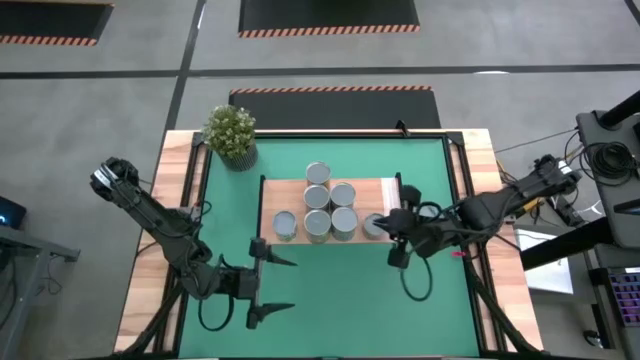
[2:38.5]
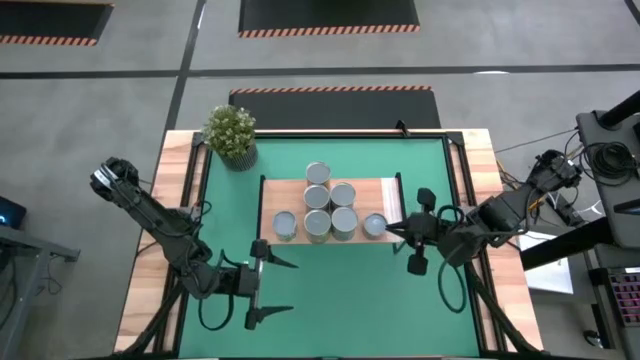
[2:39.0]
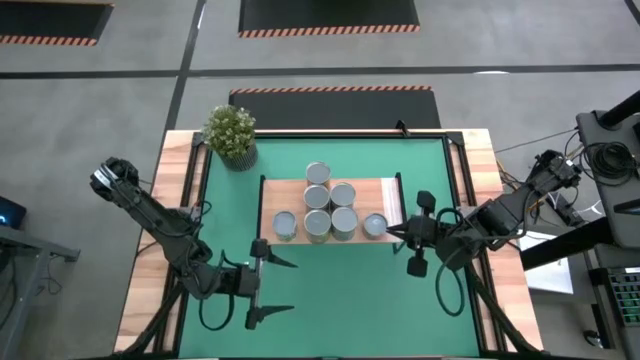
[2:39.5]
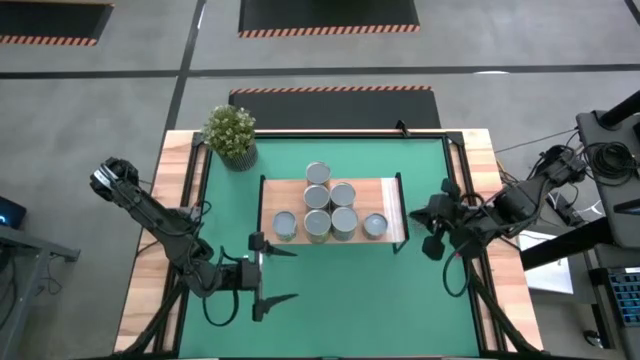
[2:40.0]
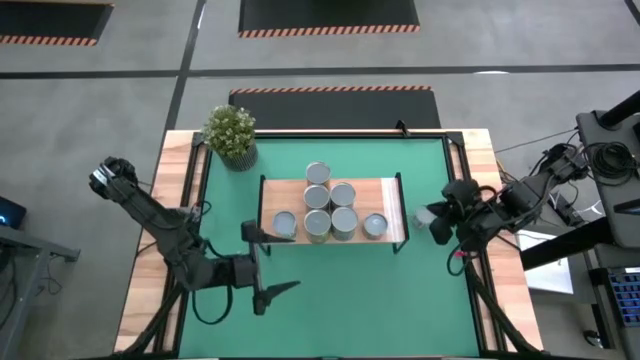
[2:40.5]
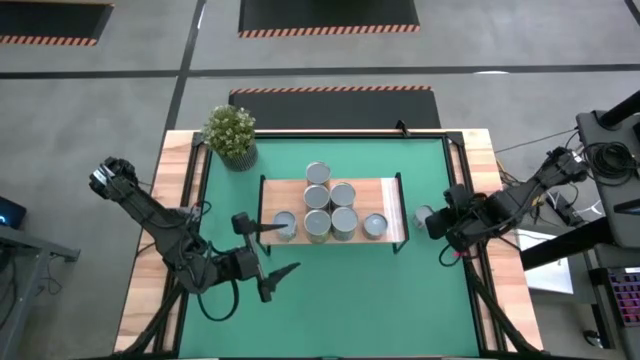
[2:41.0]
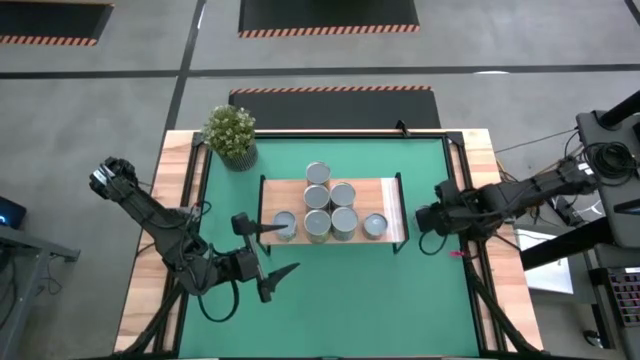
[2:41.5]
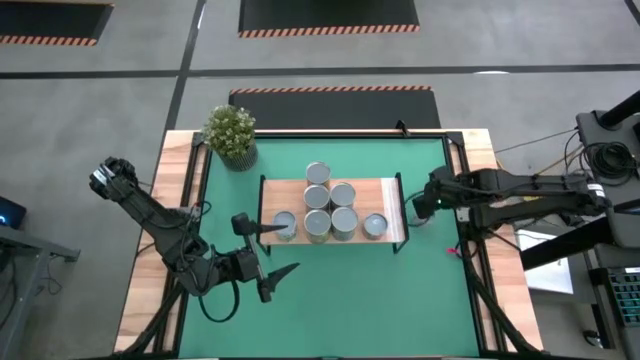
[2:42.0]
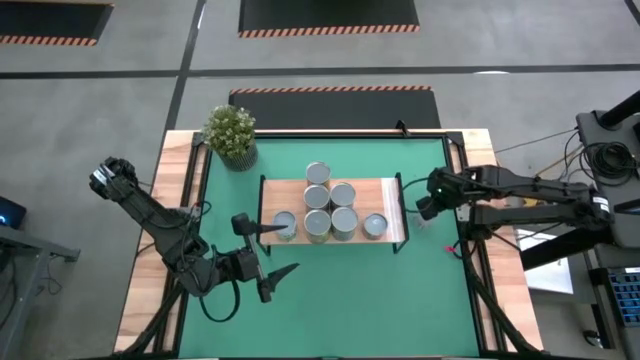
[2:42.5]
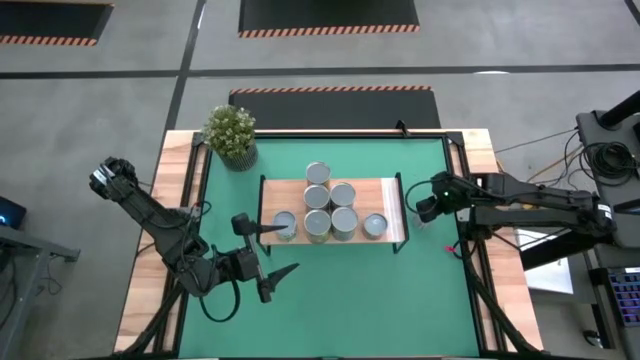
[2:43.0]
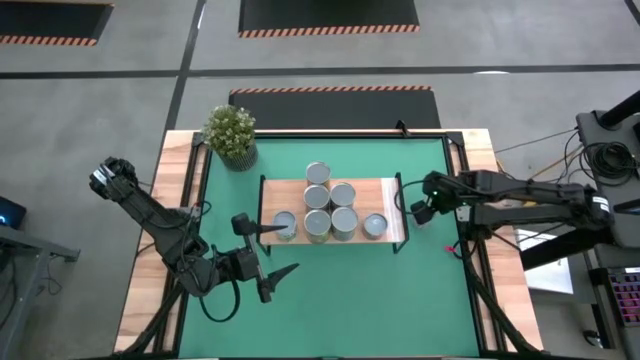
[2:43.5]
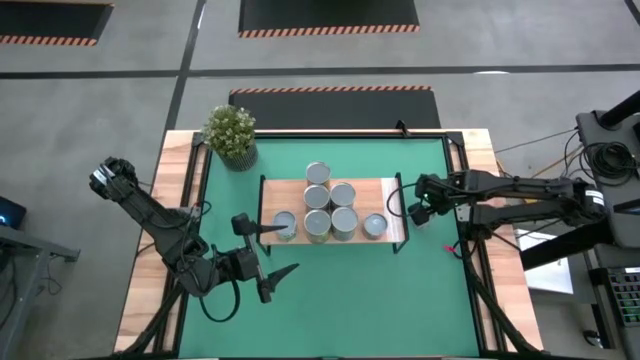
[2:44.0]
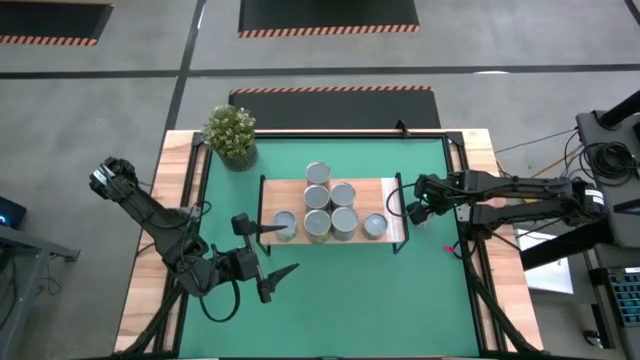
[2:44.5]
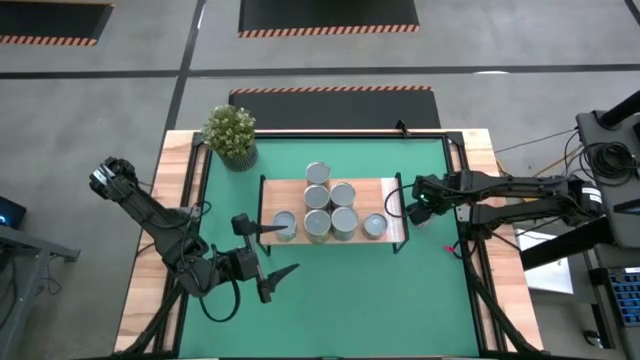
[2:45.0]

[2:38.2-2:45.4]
Task: Pick and place cans onto a shelf
Put the canned of carrots on the shelf

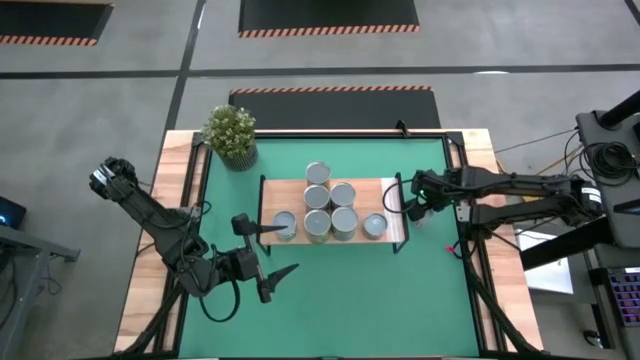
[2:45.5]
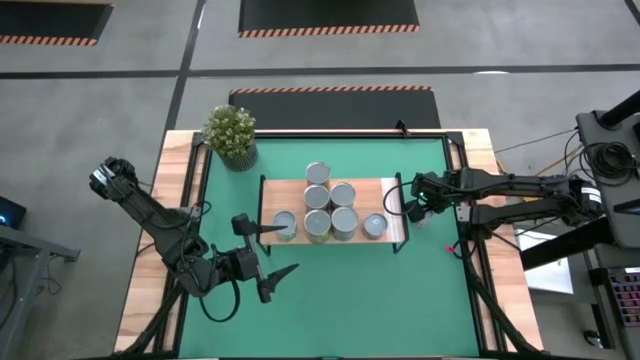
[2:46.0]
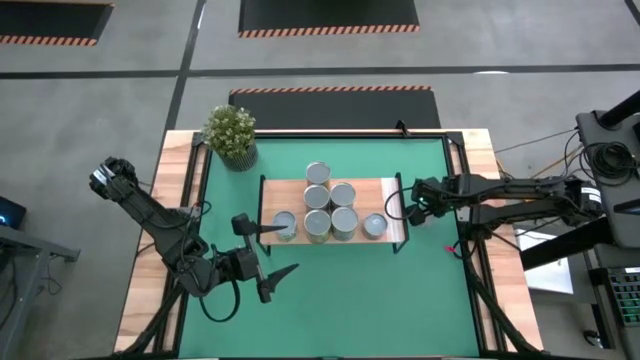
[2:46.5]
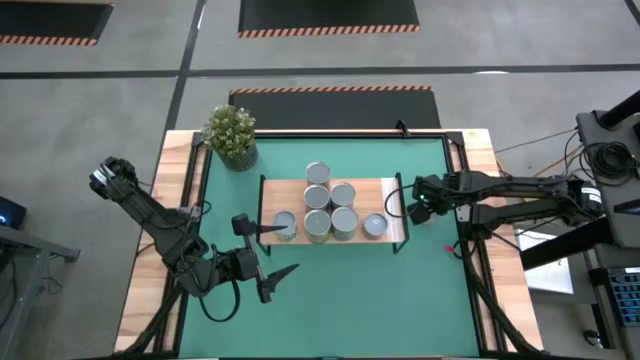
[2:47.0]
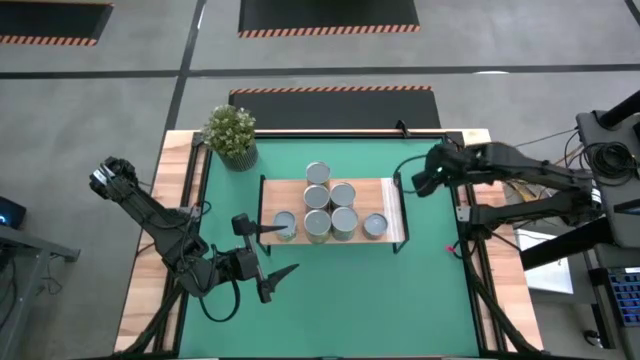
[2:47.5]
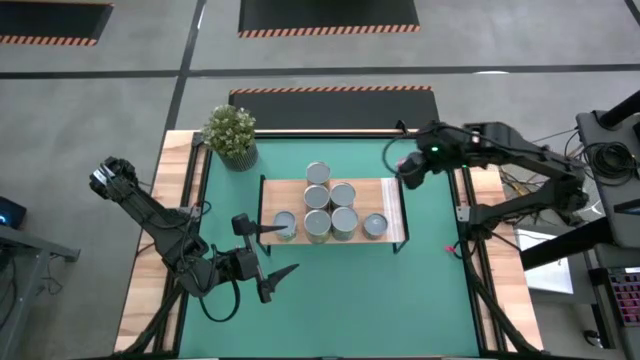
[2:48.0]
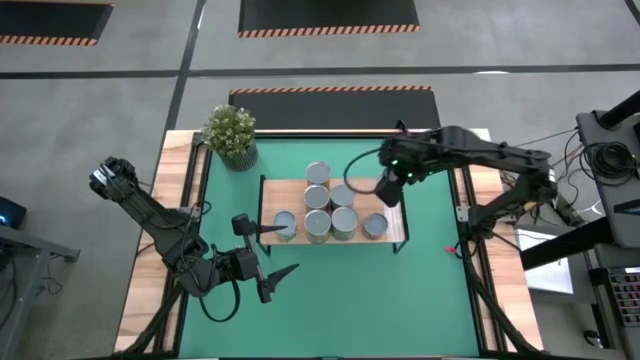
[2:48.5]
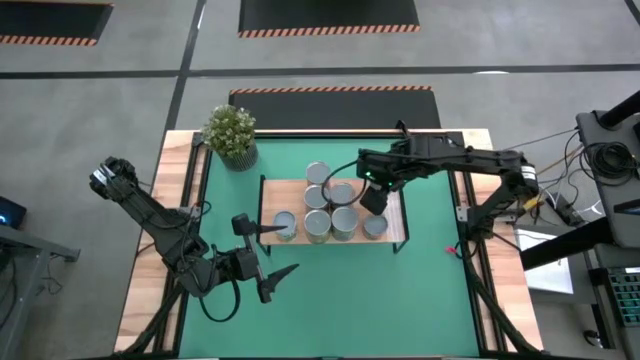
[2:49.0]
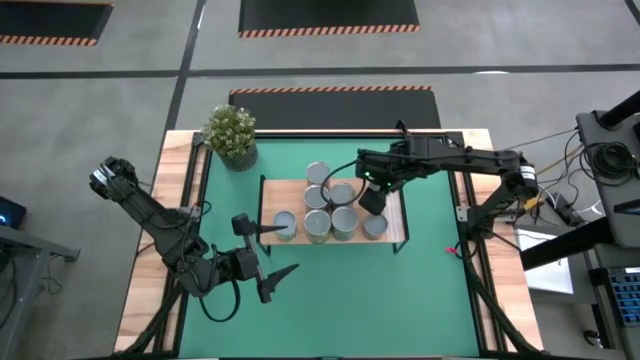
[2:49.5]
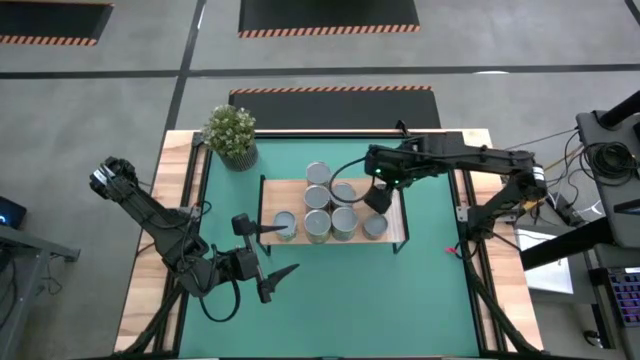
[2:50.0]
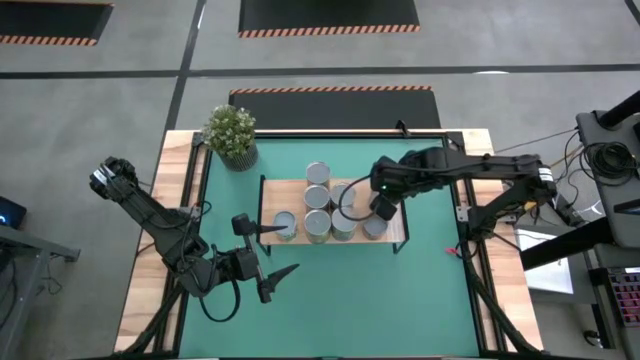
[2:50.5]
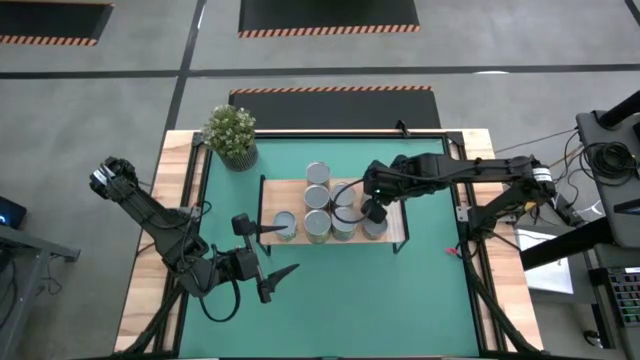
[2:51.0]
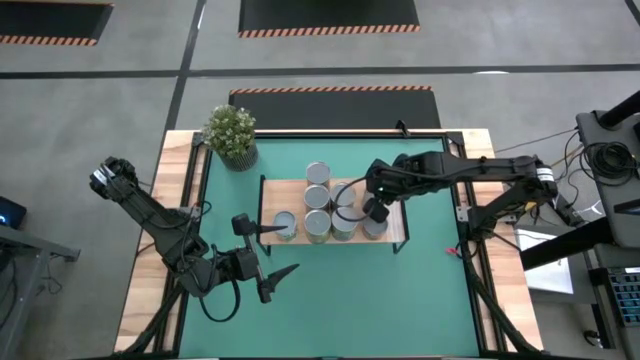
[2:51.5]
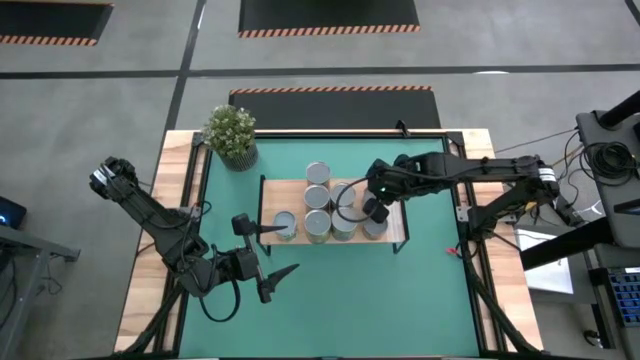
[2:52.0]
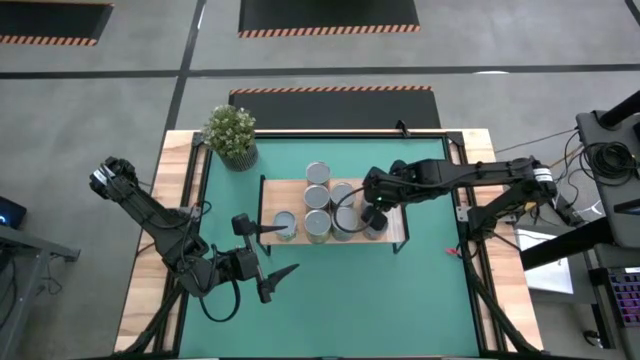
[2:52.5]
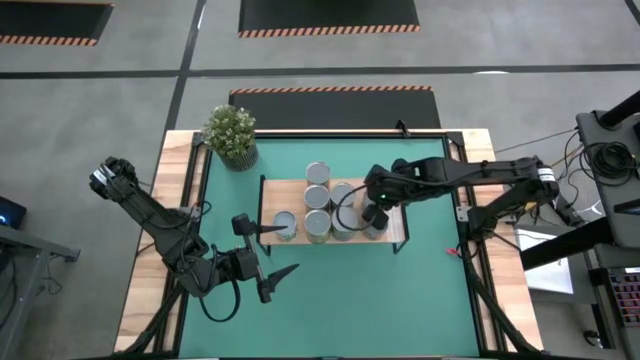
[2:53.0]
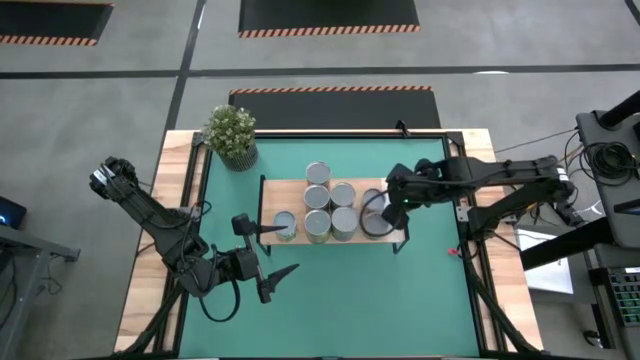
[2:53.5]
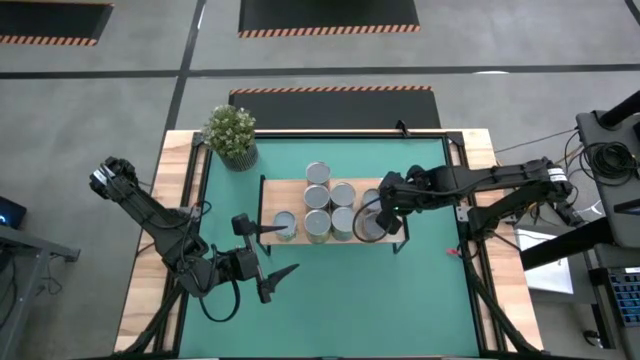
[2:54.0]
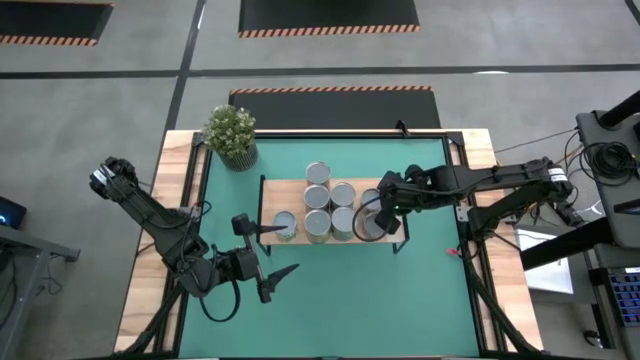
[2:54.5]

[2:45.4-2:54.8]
Put the canned of carrots on the shelf

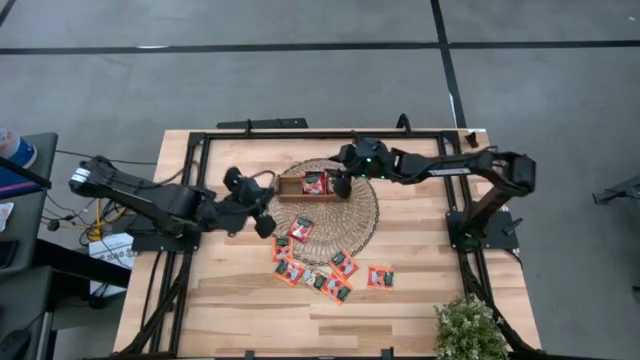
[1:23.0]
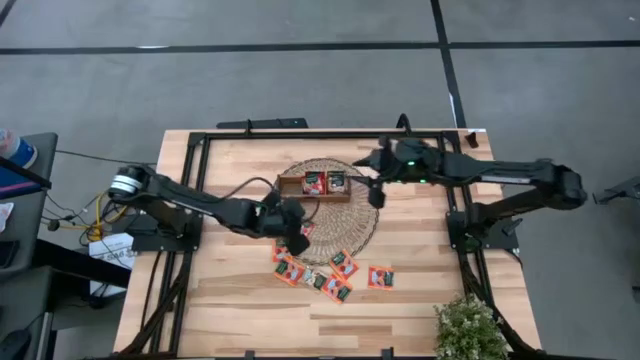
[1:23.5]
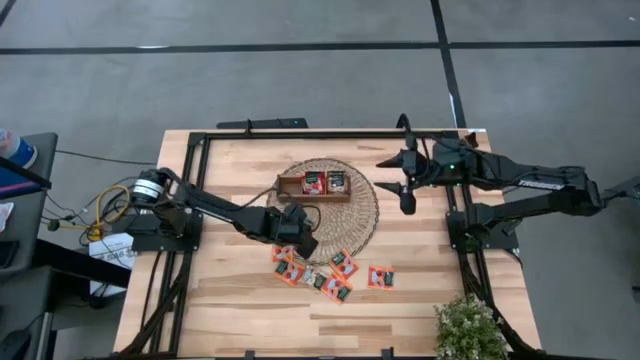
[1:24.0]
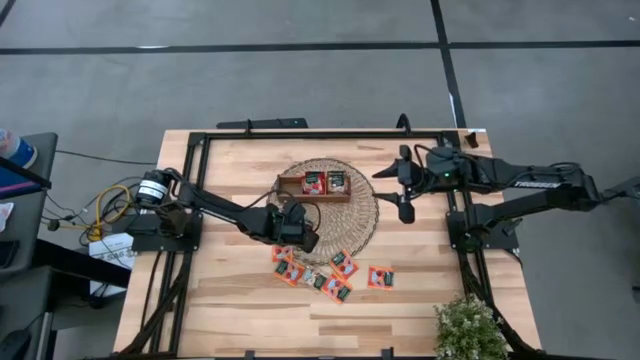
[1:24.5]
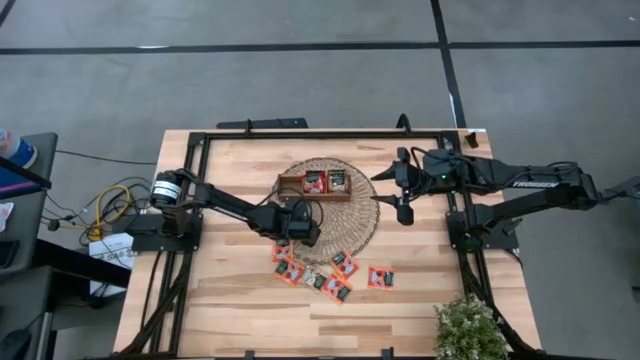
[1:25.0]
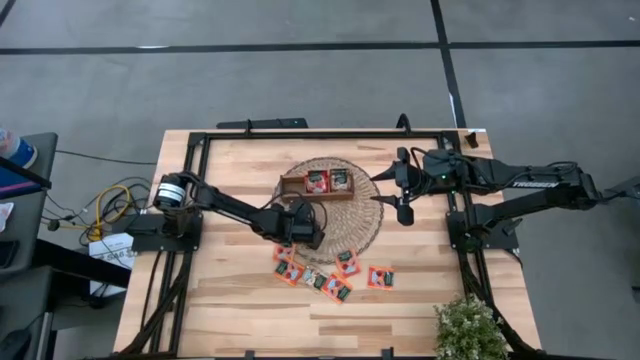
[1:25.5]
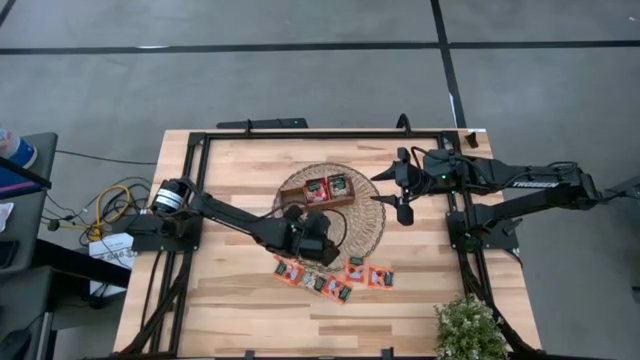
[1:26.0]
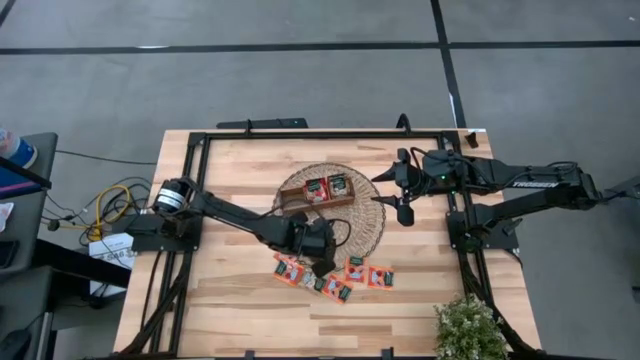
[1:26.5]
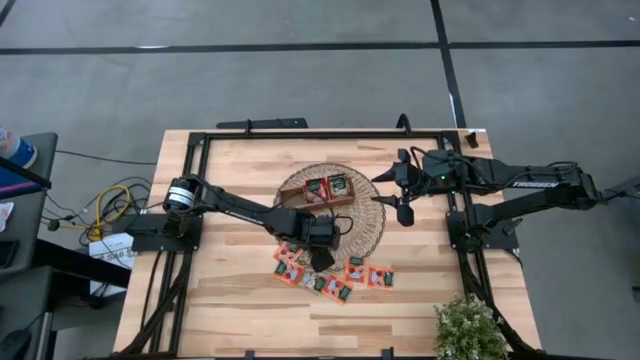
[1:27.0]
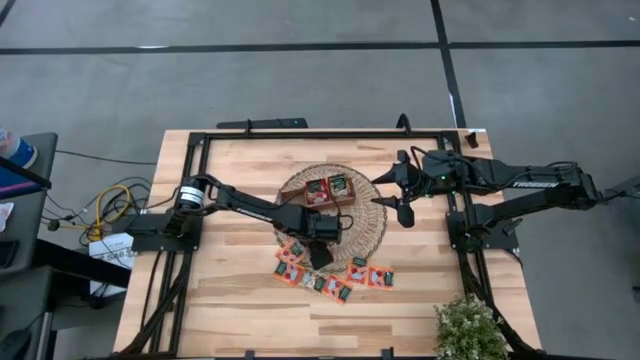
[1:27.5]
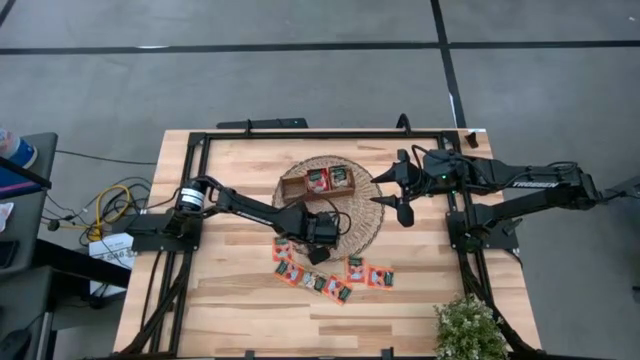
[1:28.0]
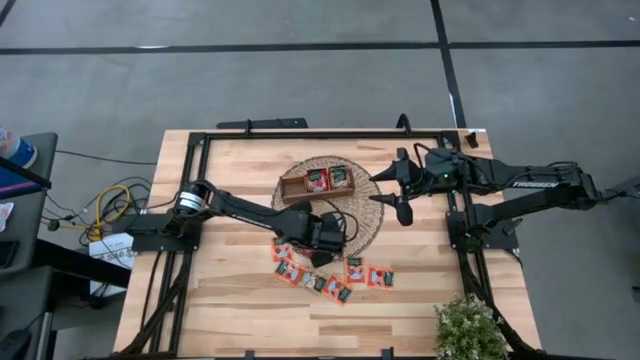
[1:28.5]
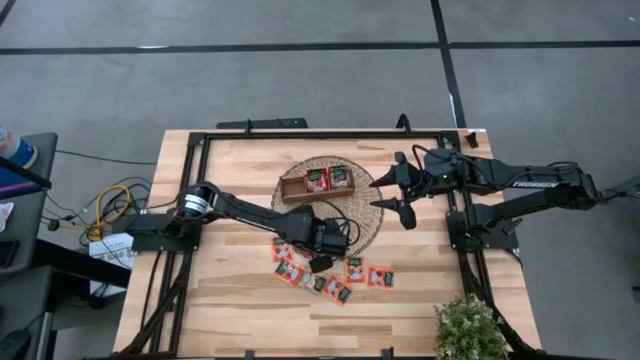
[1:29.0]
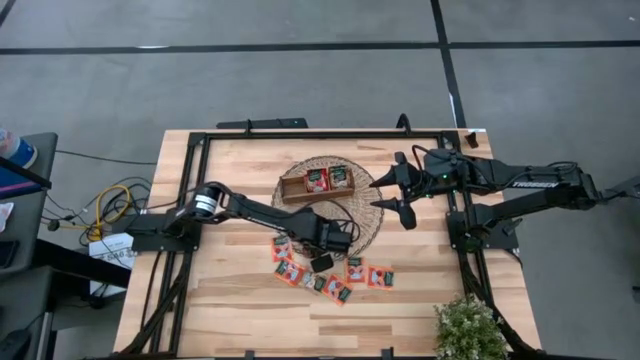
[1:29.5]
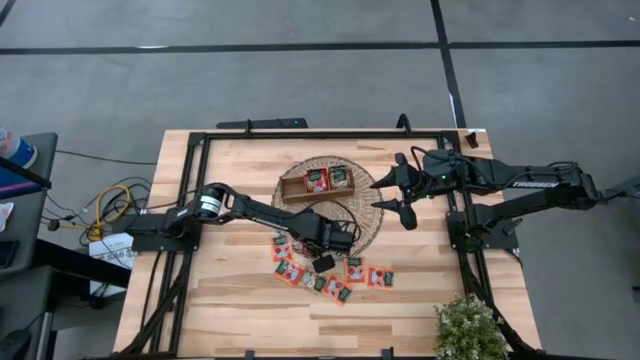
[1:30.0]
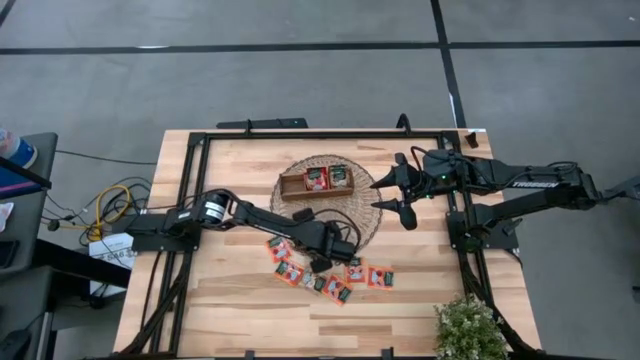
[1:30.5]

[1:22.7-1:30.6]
Task: Pick & Place Tea
Put the red tea bag into the middle section of the wooden organizer
